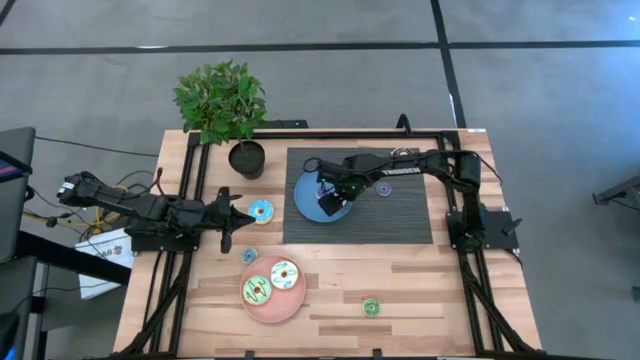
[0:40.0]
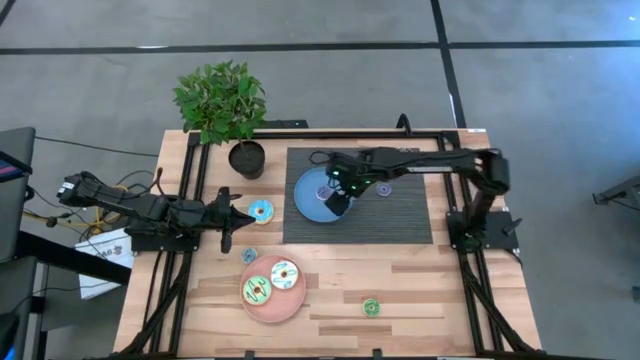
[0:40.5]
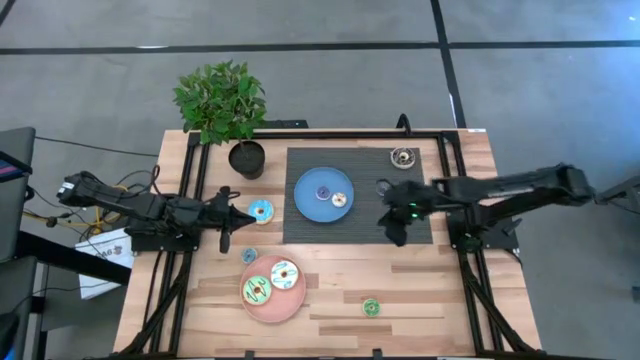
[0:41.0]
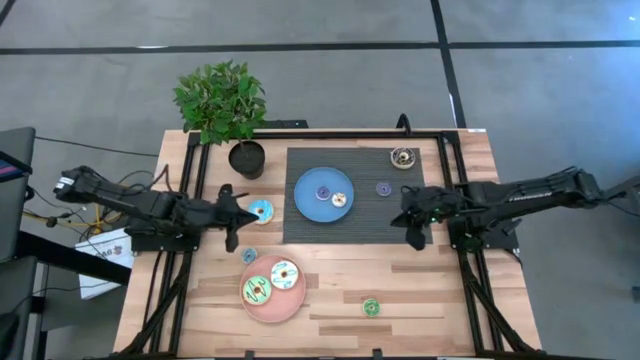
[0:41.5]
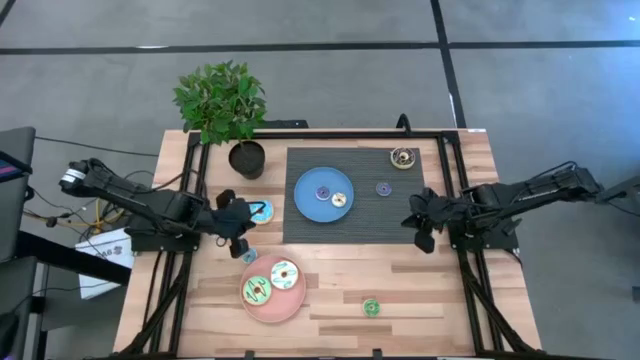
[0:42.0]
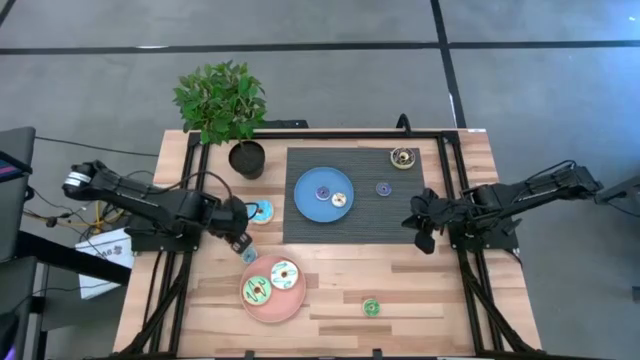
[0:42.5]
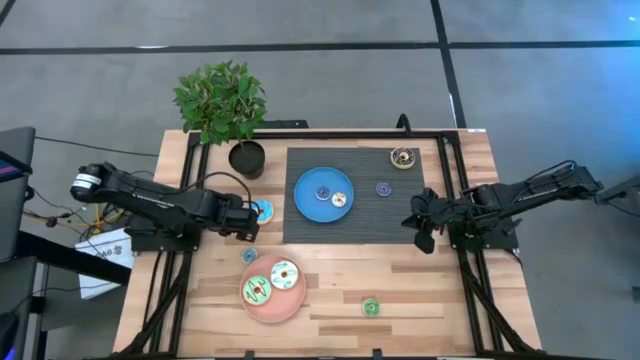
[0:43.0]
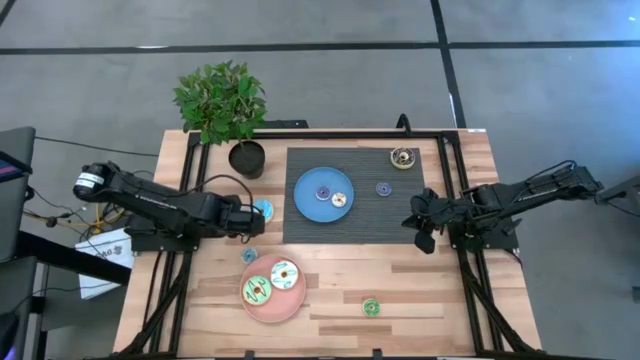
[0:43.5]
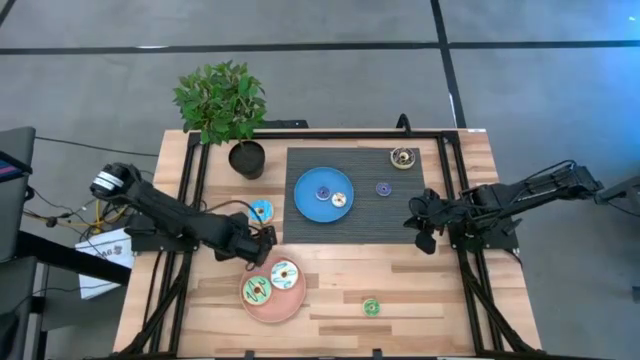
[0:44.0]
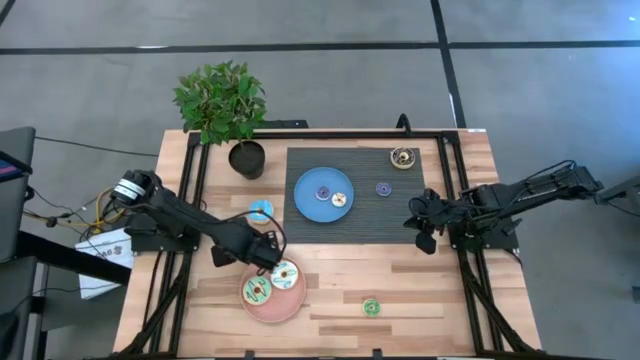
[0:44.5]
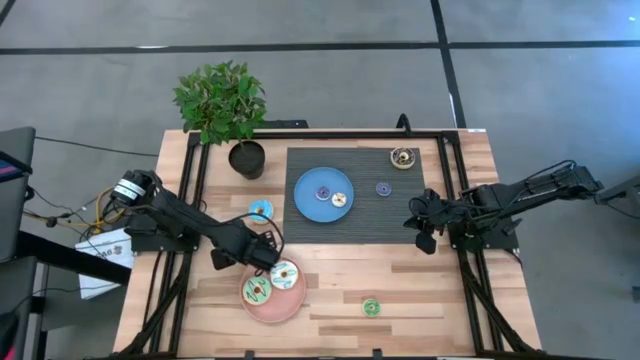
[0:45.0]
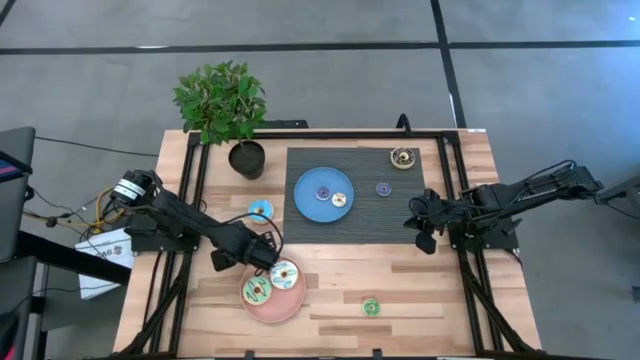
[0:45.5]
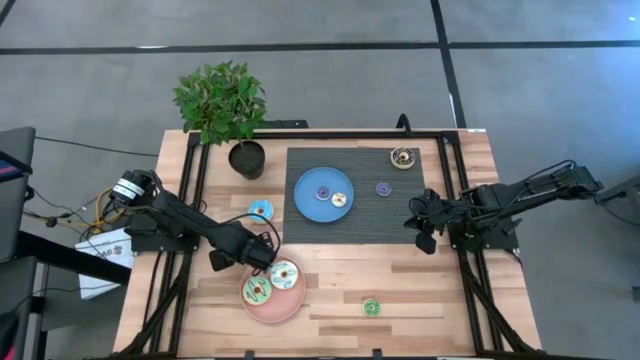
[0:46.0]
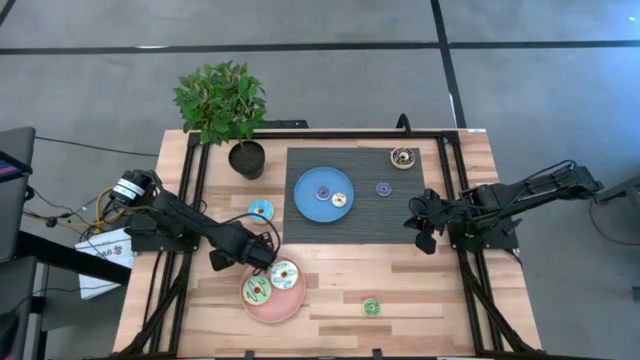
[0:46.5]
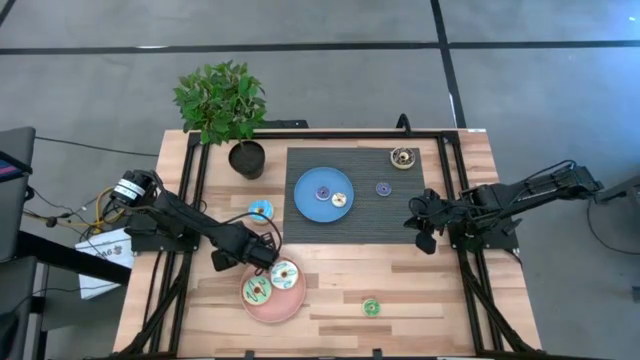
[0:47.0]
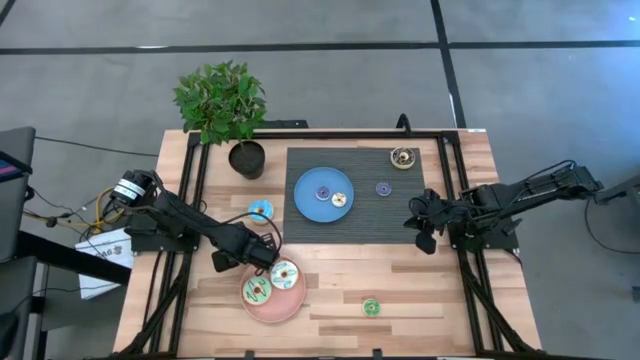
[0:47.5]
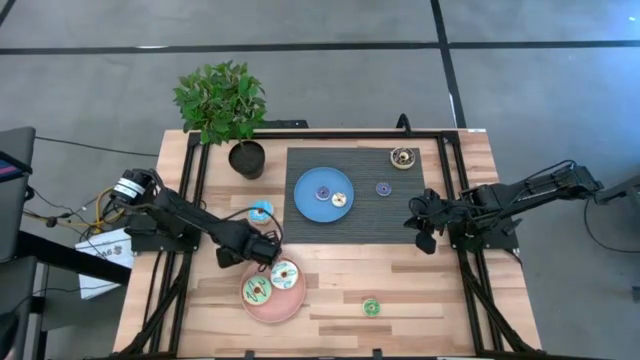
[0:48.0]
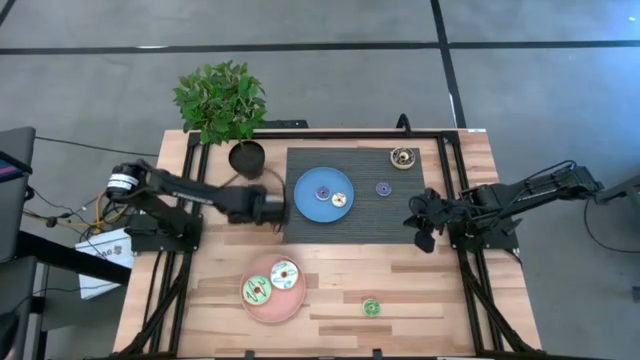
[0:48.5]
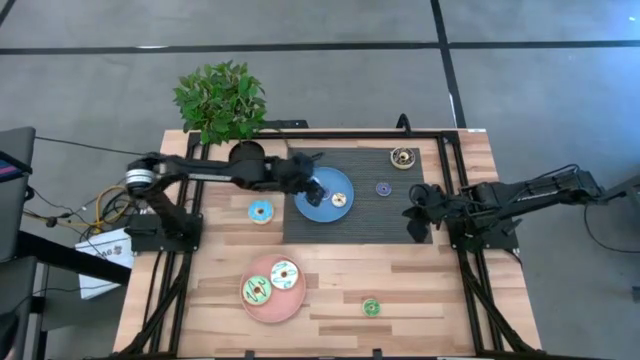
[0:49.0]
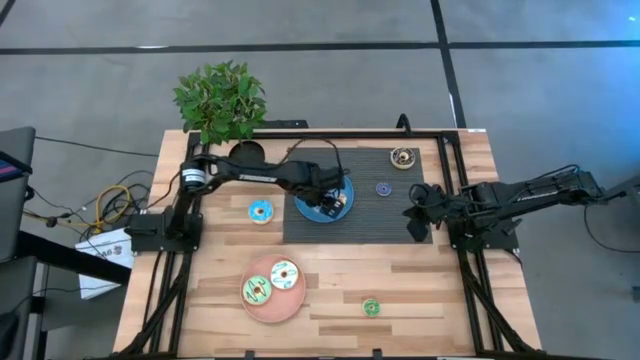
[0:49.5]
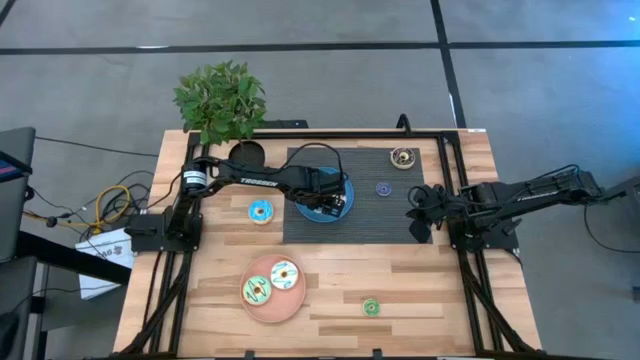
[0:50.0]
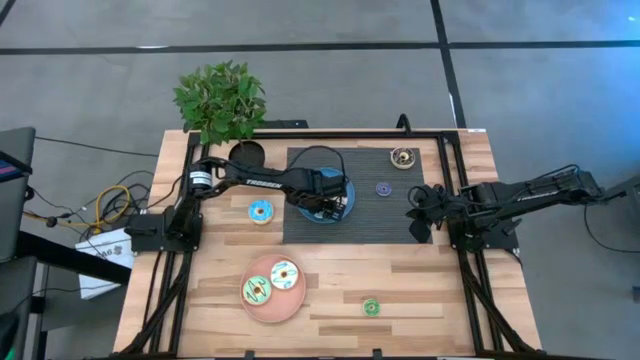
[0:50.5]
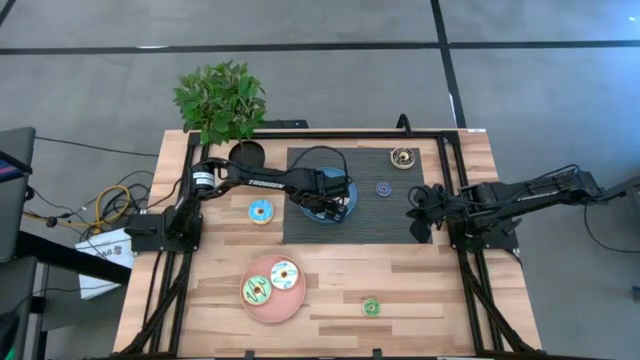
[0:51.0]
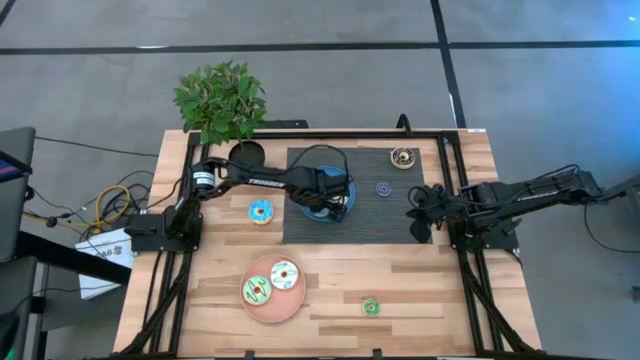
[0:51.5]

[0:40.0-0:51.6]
Task: Pick & Place donuts
Put the small blue donut on the blue plate

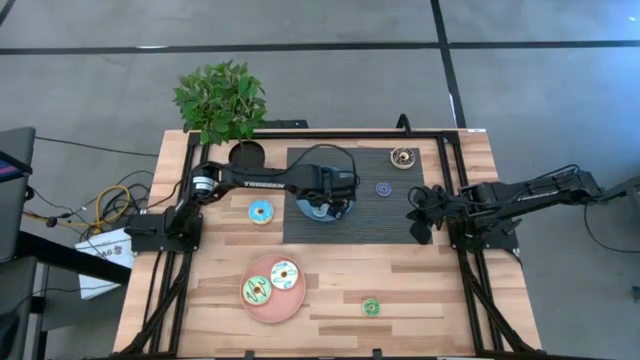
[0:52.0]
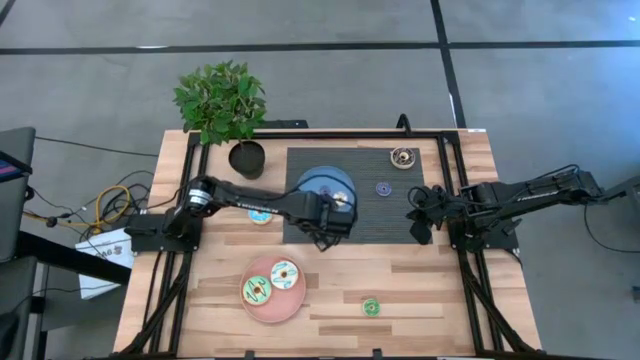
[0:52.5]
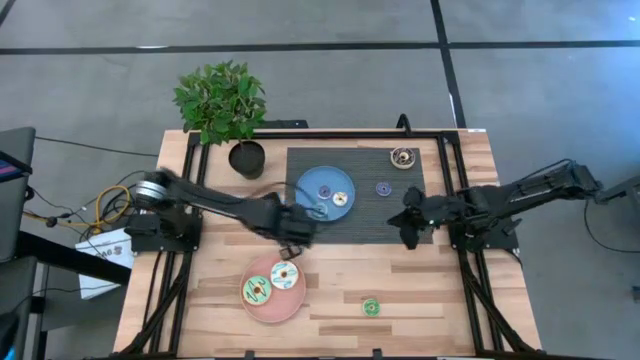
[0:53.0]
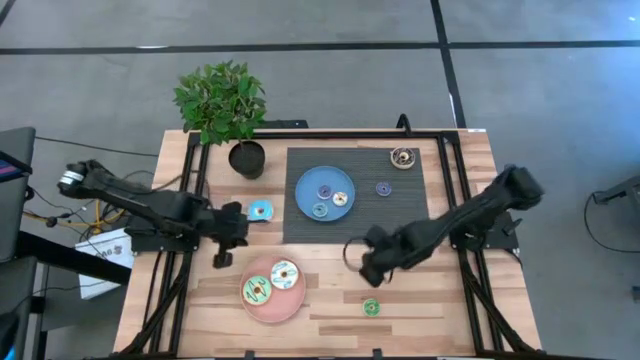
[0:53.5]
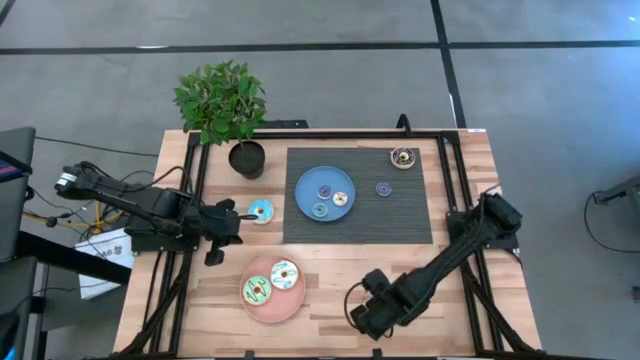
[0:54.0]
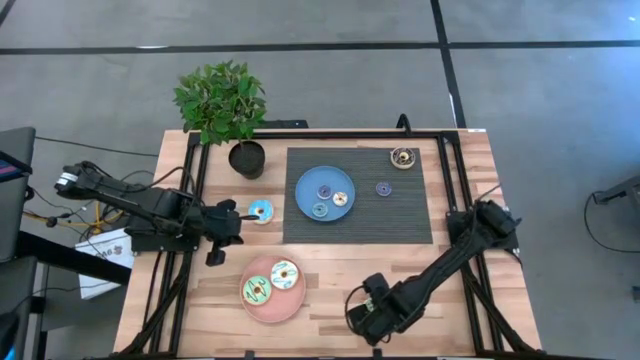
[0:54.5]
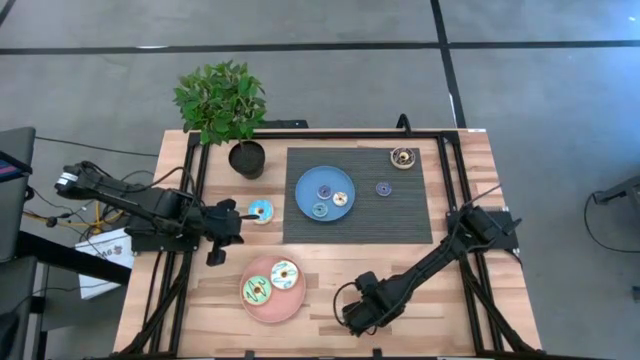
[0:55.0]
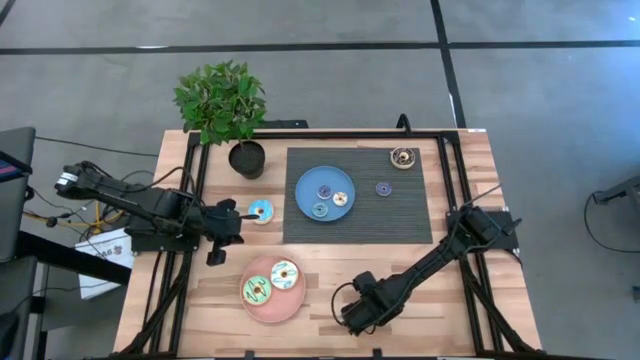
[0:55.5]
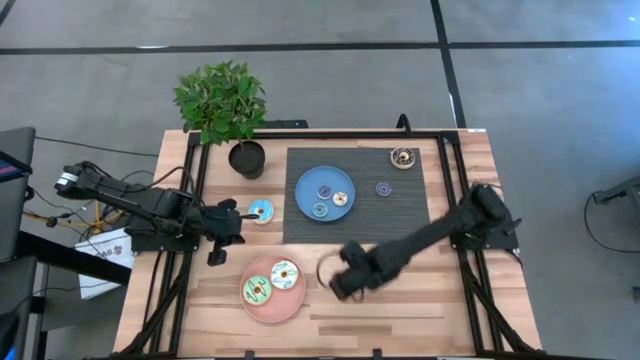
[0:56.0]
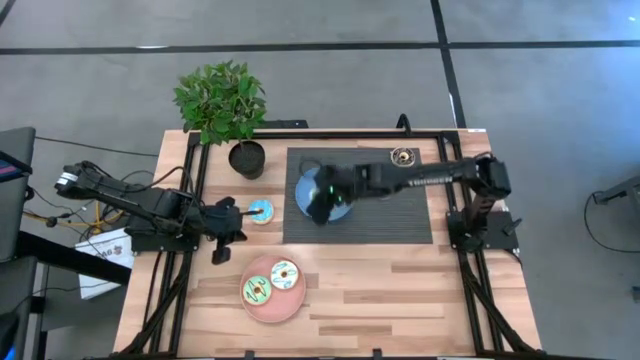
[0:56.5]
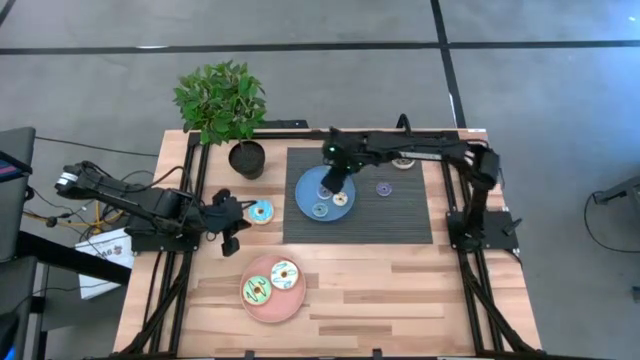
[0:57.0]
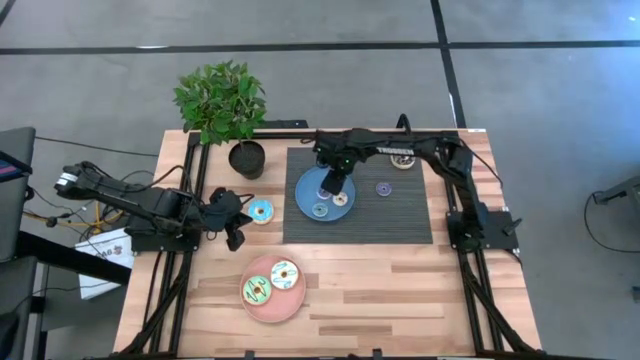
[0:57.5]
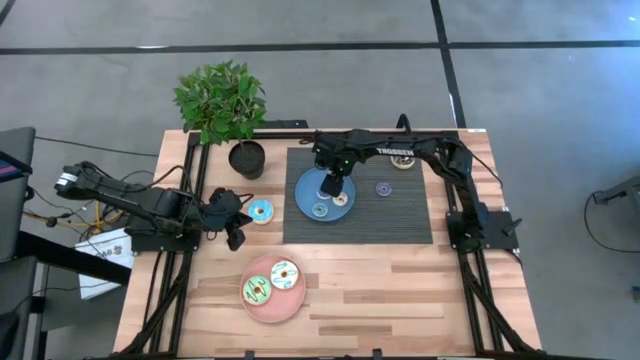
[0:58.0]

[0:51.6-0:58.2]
Put the small green donut on the blue plate

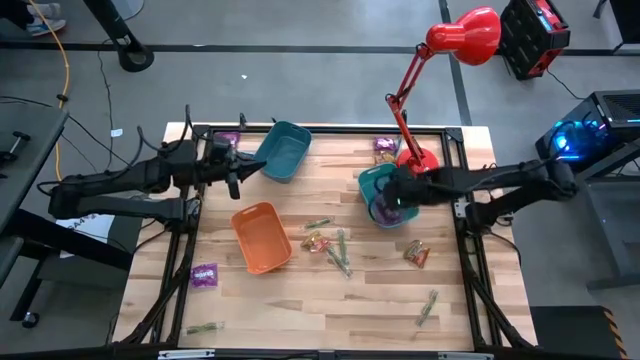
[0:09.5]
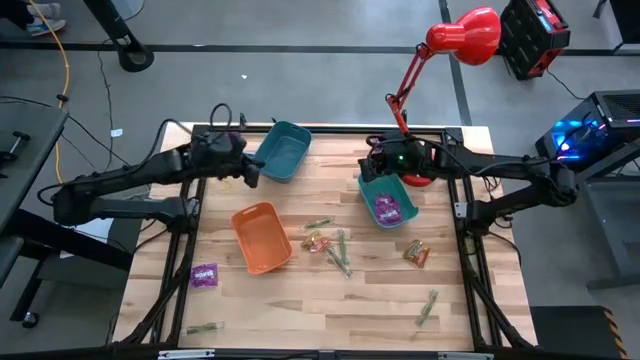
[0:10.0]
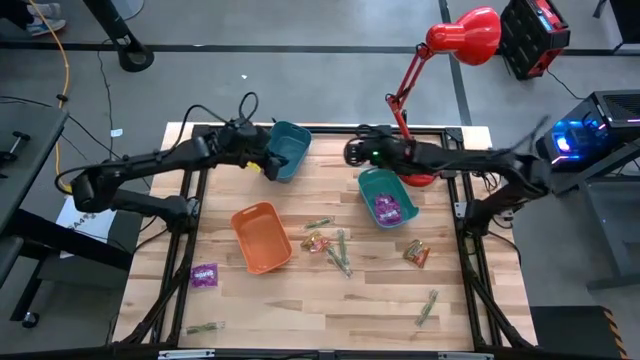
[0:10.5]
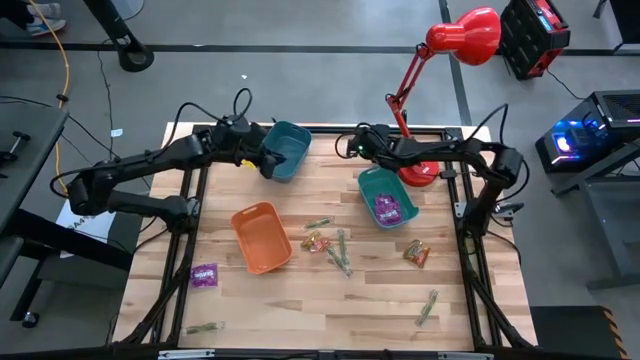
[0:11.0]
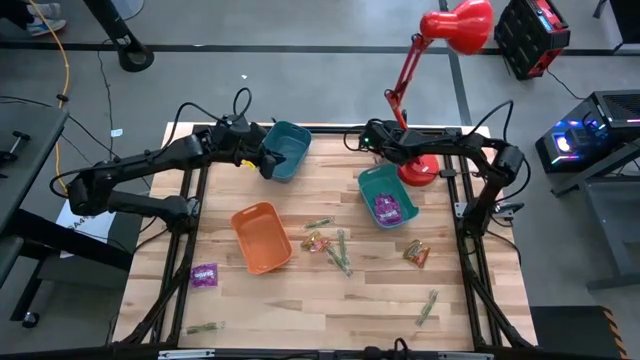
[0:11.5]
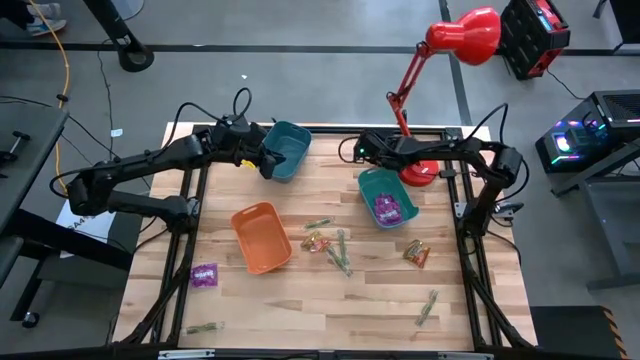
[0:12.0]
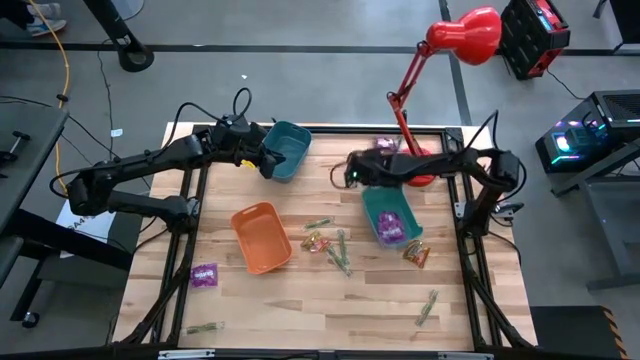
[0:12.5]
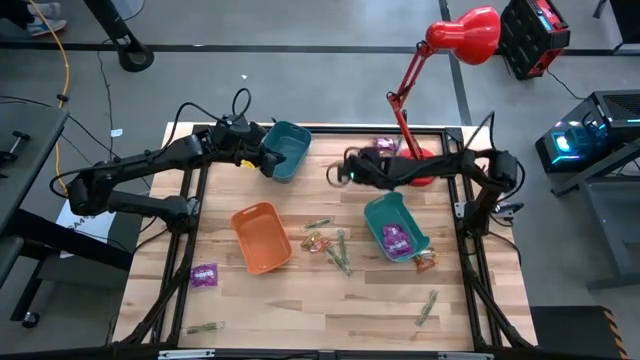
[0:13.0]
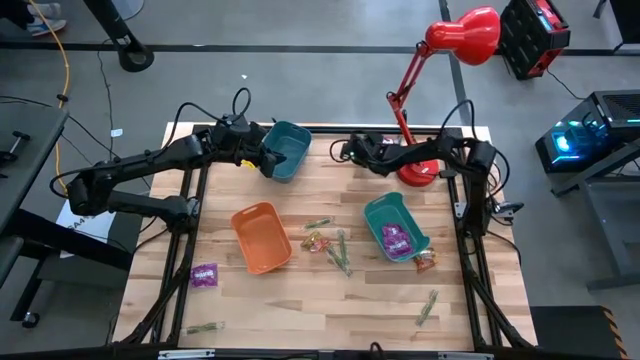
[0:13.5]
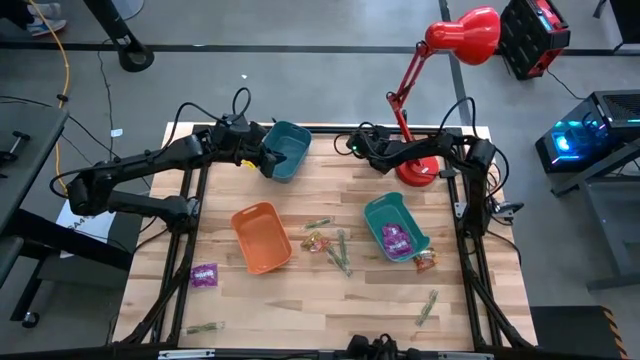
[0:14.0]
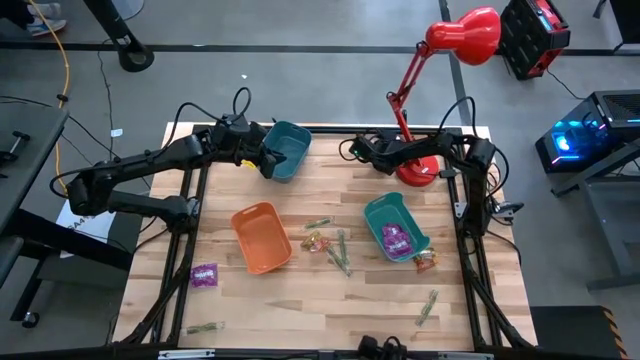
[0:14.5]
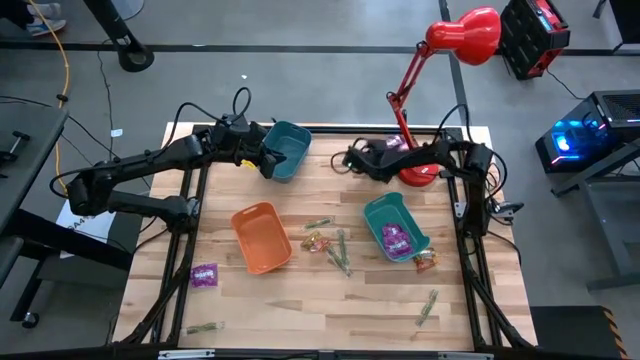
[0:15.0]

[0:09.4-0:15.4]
Task: Sort candy
Adjust the blue candy
